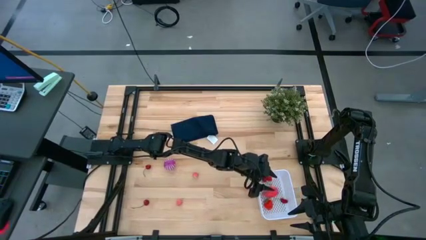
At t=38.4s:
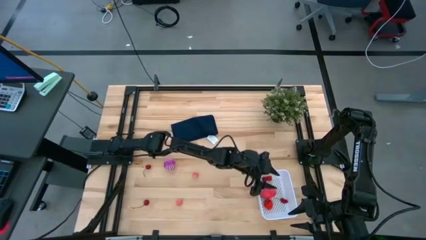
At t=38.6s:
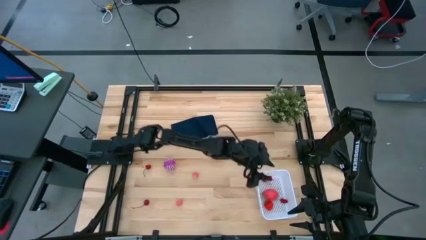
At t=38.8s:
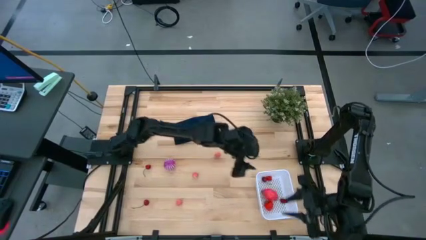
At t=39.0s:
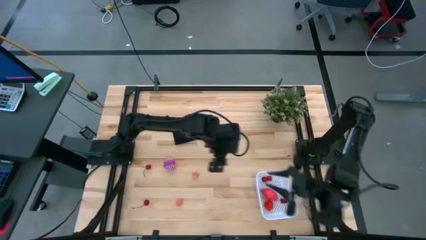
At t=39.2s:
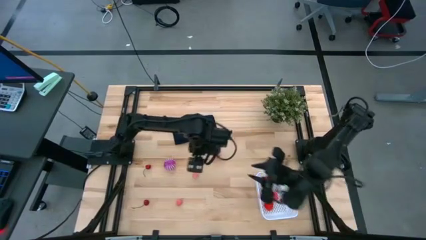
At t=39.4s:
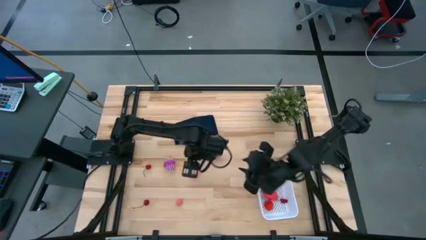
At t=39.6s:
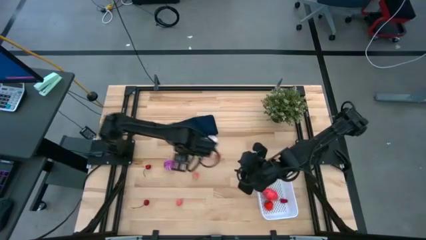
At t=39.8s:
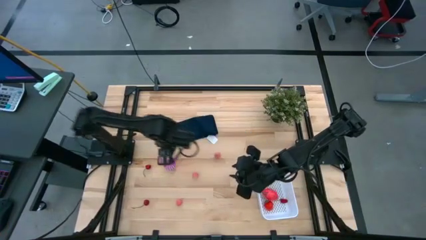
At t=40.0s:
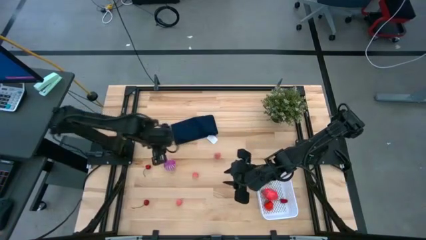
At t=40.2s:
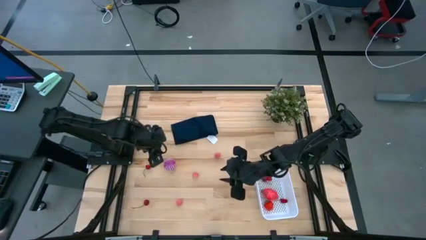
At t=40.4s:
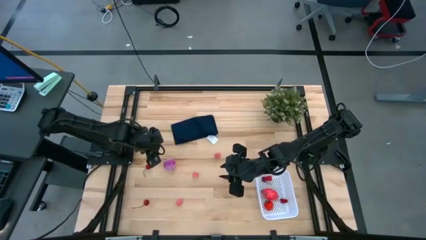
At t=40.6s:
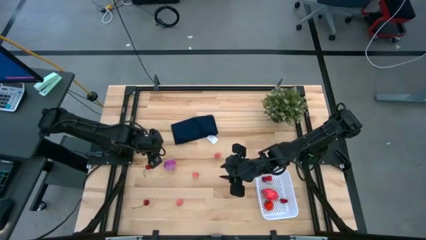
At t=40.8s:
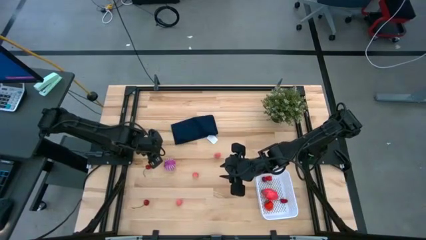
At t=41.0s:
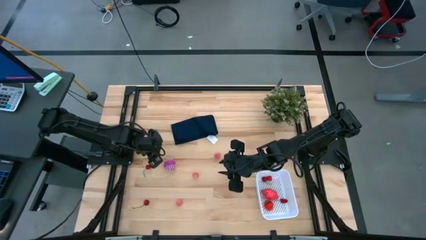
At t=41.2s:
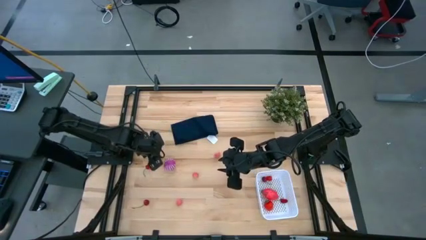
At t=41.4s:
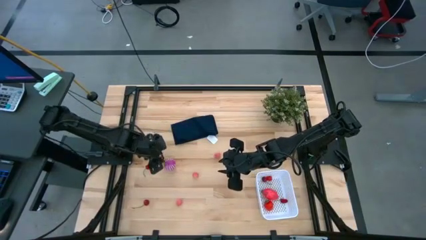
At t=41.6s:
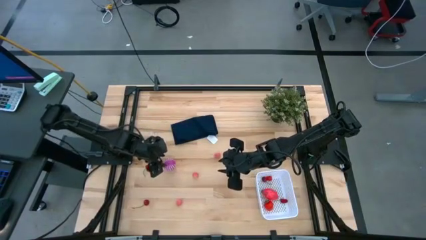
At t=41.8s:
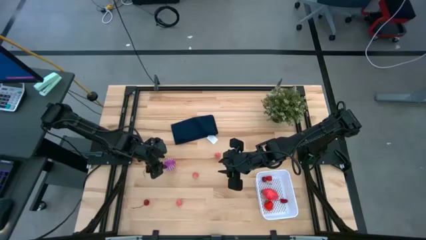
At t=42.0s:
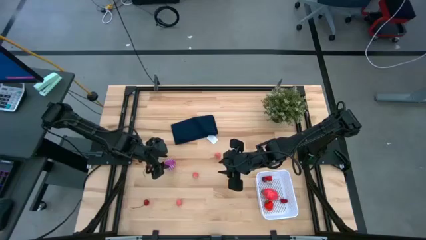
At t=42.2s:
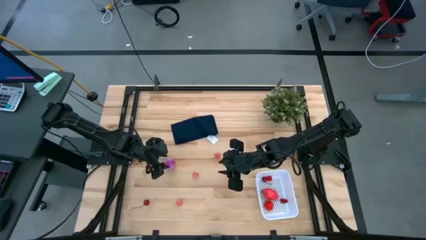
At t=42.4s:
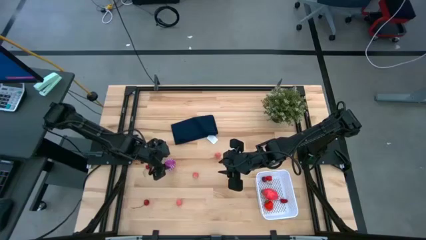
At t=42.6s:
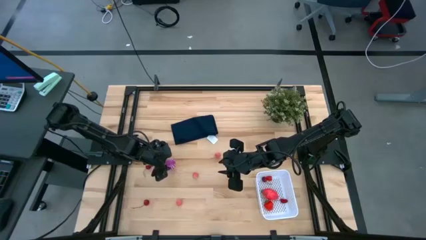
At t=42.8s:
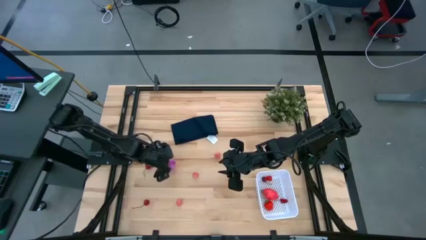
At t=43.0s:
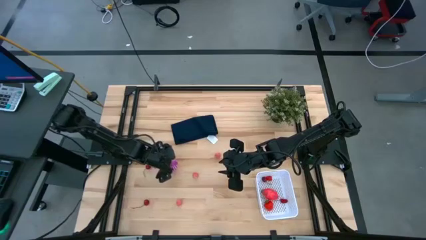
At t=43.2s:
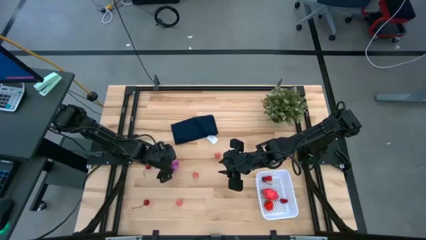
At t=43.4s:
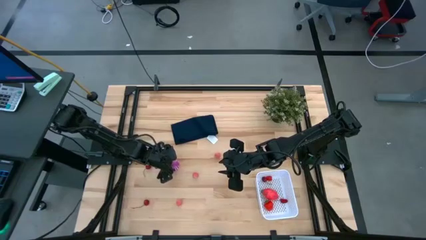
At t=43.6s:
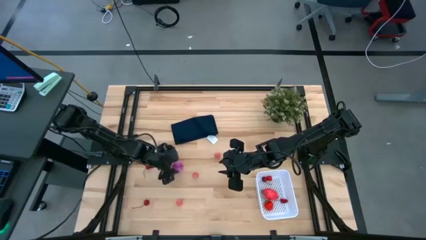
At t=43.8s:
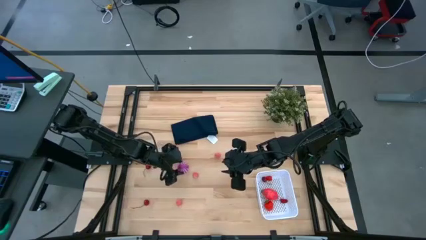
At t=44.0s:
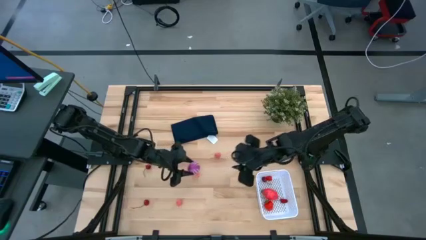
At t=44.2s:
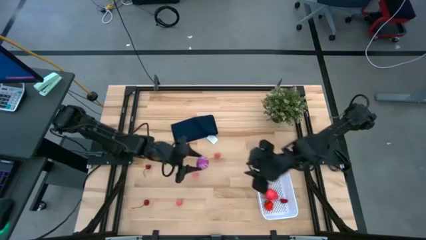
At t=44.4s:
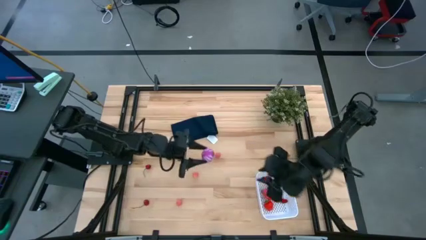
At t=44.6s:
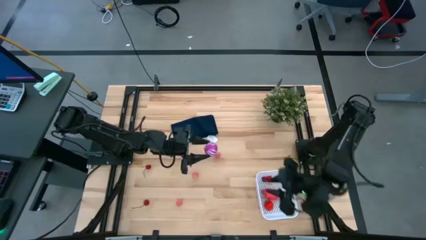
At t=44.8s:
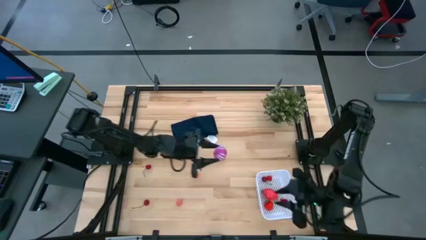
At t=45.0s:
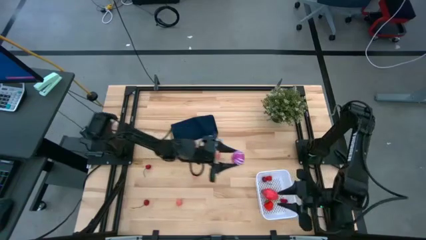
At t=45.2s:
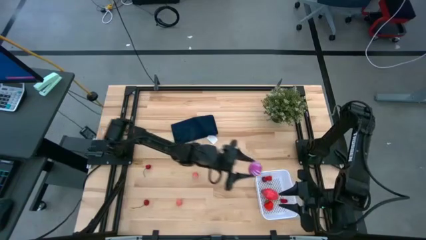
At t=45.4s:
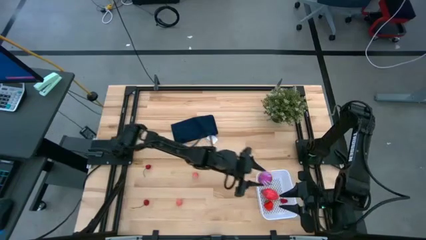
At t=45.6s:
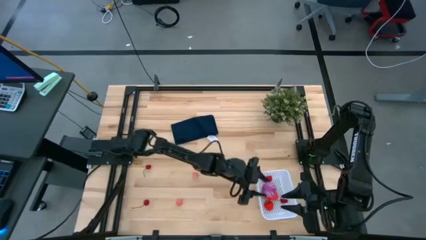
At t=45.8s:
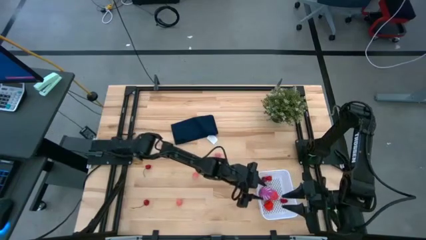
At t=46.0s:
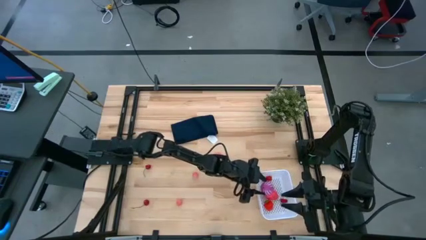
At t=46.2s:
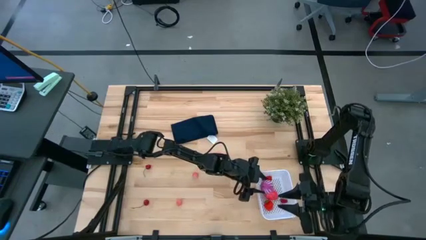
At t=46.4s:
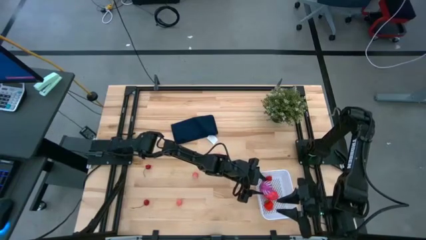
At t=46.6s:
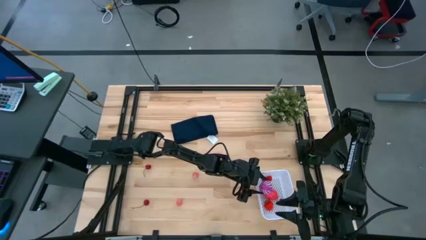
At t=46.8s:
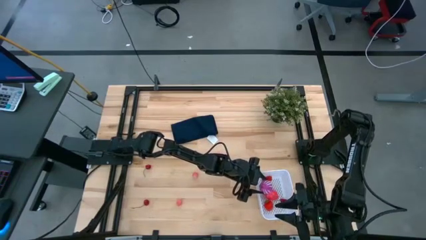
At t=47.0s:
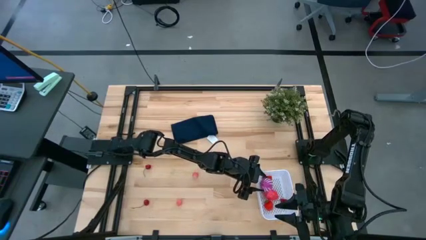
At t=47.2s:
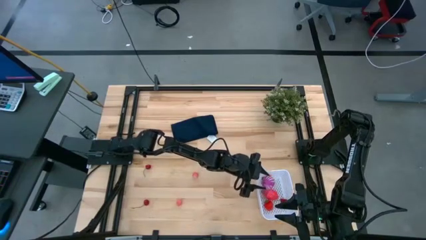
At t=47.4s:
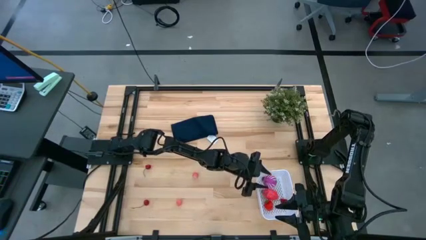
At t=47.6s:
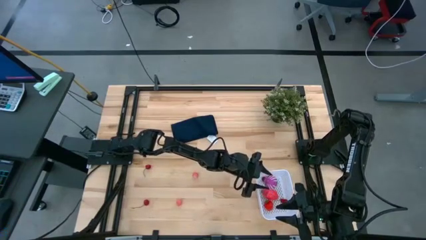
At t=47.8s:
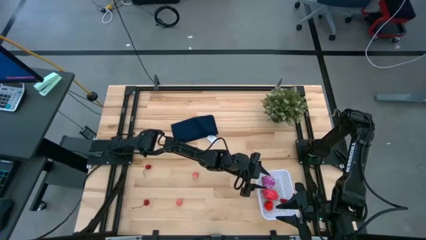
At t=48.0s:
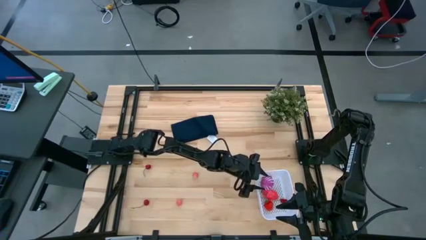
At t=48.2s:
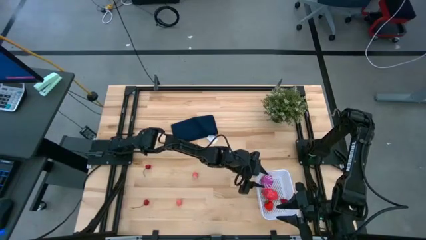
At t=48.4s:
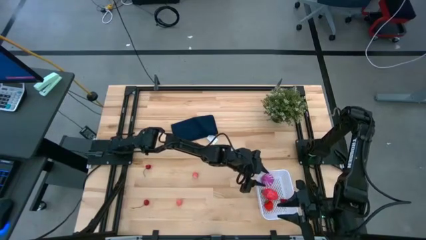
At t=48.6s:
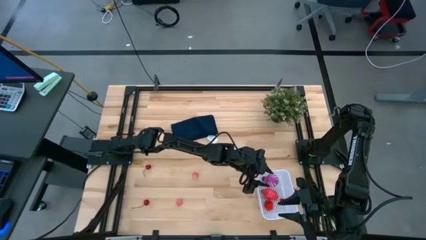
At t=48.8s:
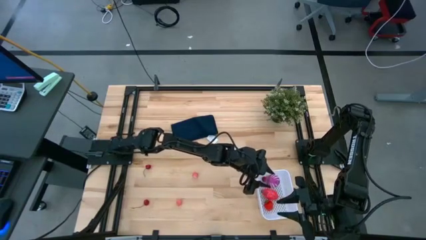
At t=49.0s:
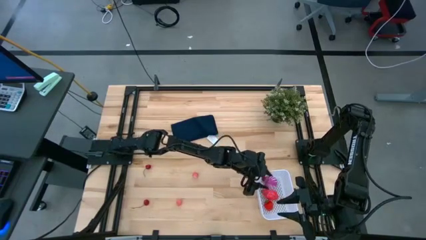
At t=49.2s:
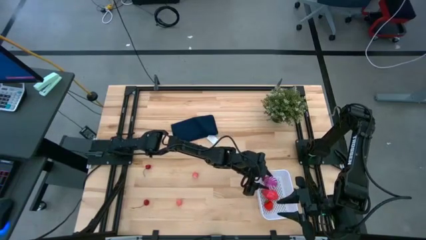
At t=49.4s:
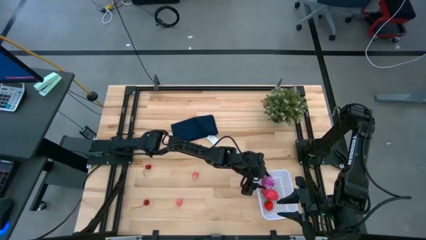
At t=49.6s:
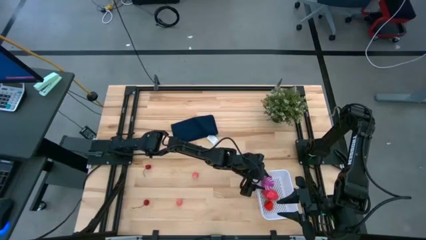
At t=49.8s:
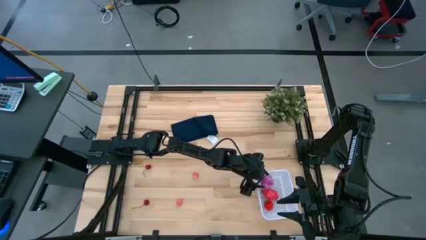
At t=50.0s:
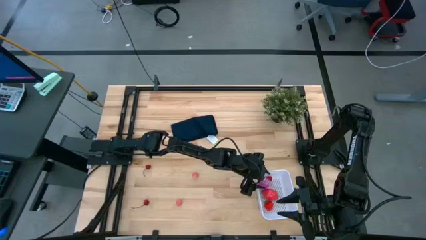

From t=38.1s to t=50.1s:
Task: Pick and placing Produce into tupperware
Put the onion into the white bin

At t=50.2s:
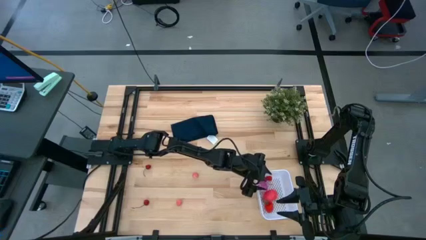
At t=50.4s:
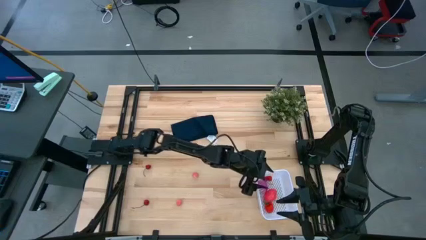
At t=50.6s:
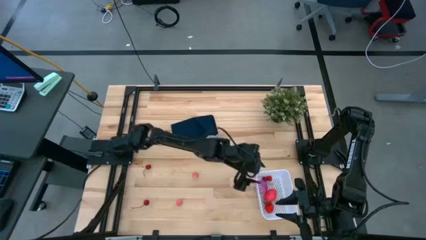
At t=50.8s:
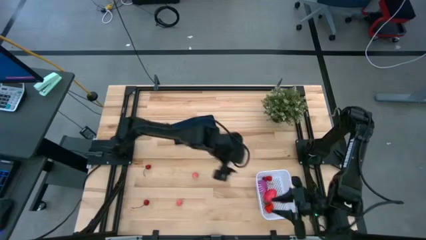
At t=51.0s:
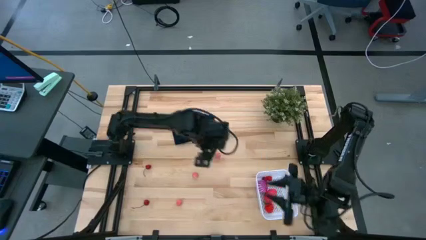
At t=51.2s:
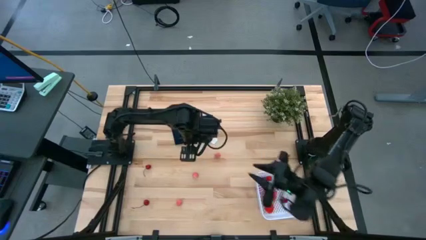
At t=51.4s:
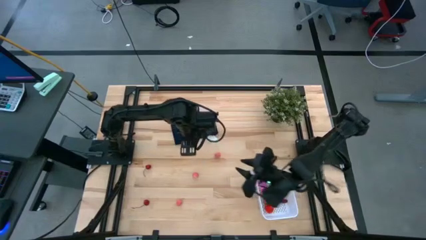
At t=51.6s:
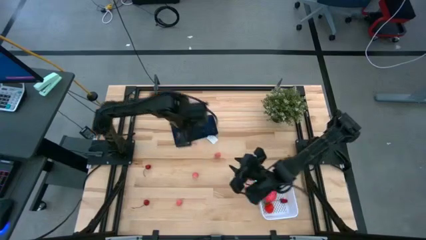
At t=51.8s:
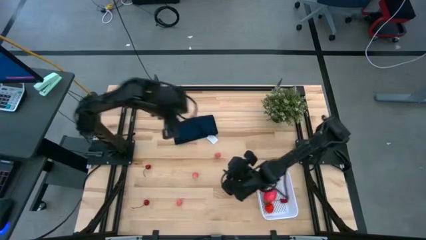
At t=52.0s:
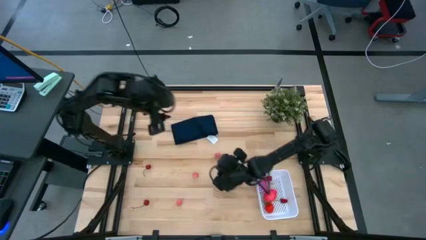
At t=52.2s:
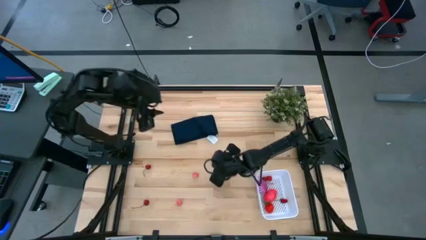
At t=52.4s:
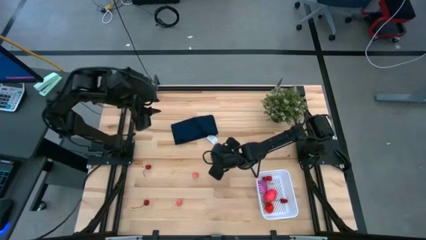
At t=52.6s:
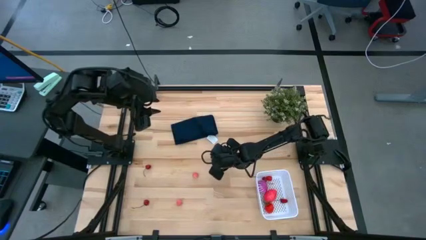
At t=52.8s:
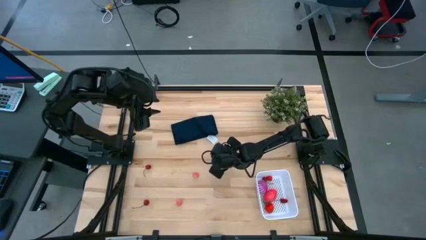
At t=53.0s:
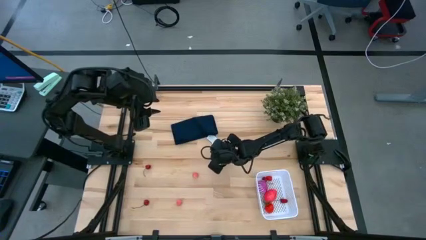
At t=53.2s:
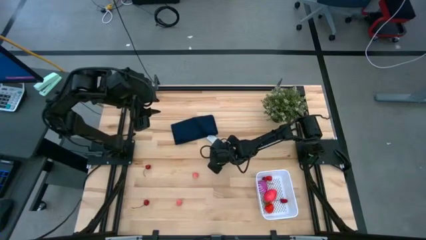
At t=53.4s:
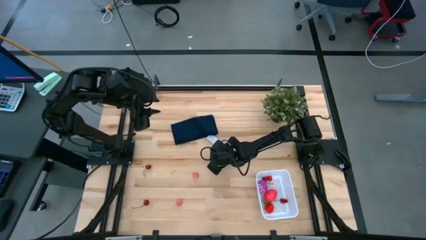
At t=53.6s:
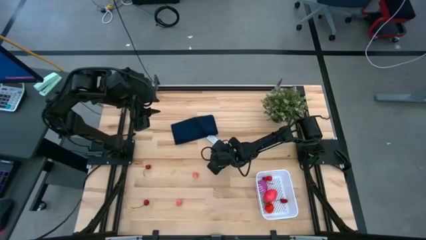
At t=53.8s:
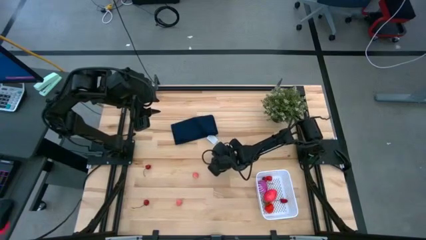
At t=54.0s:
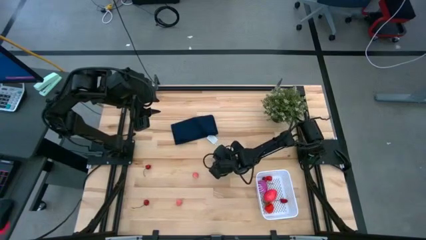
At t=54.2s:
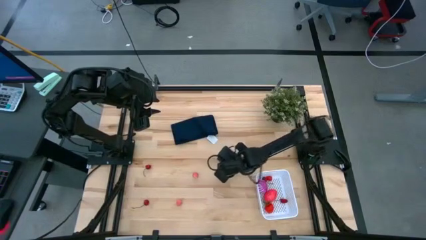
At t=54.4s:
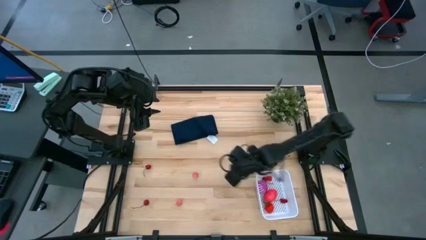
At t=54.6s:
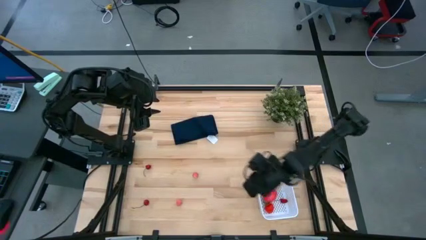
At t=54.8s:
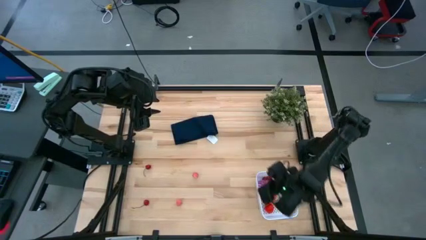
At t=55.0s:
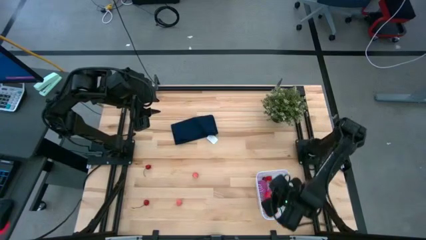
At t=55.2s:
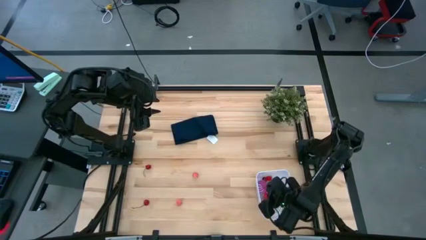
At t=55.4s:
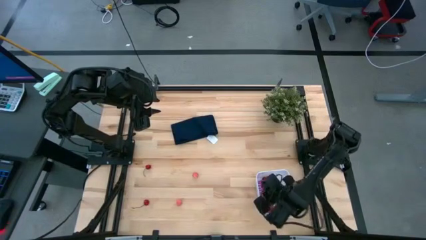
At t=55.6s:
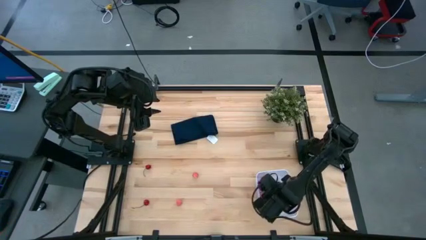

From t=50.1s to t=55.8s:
Put the peach into the white bin
